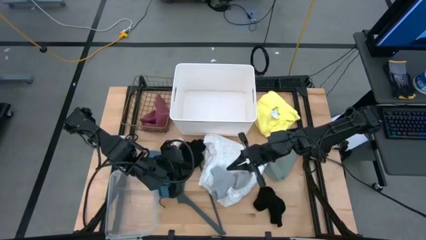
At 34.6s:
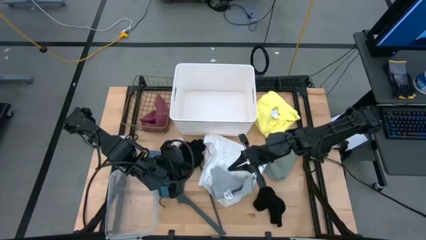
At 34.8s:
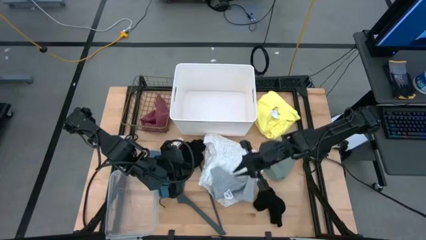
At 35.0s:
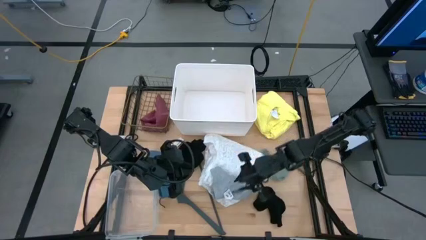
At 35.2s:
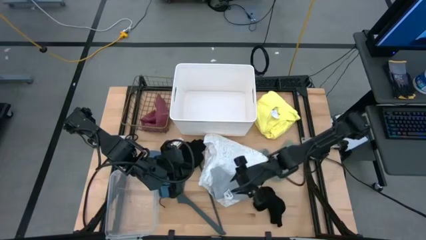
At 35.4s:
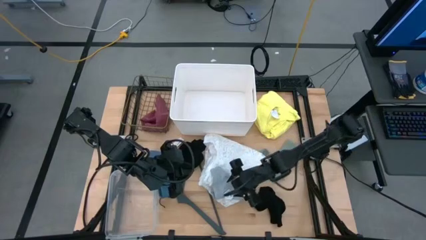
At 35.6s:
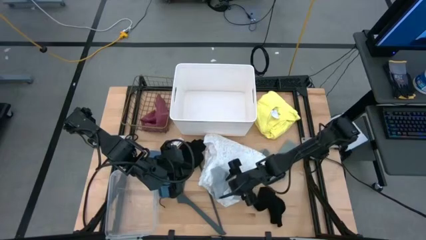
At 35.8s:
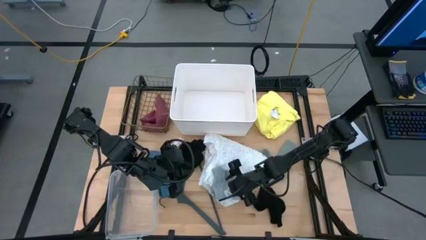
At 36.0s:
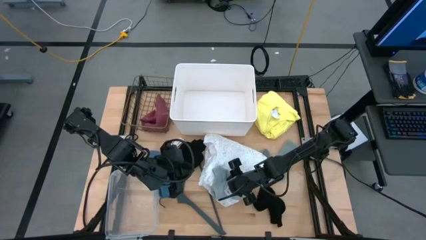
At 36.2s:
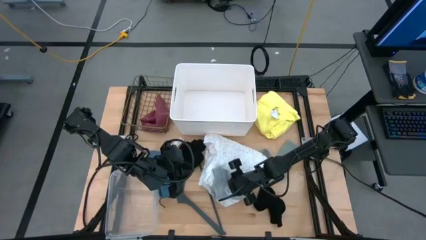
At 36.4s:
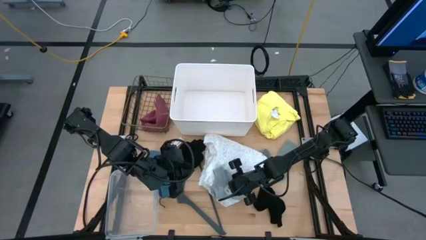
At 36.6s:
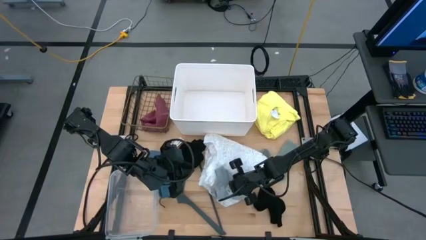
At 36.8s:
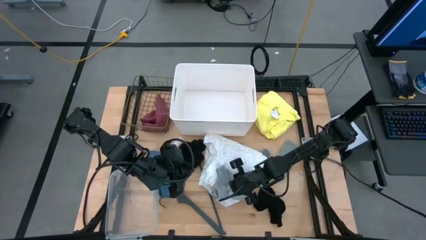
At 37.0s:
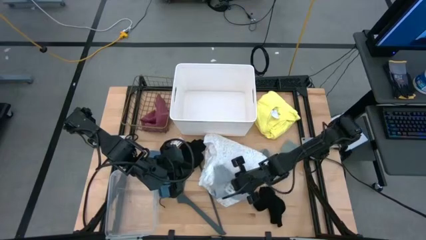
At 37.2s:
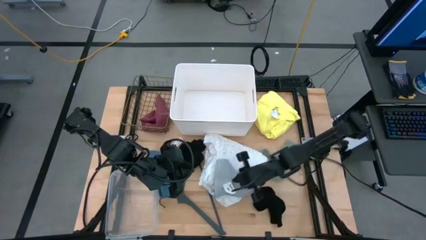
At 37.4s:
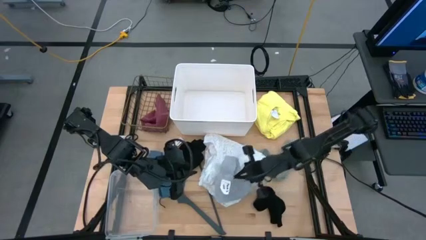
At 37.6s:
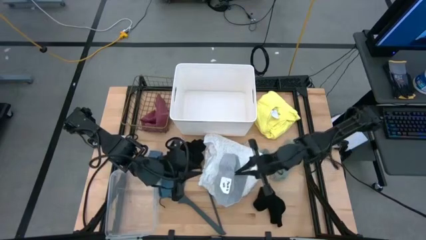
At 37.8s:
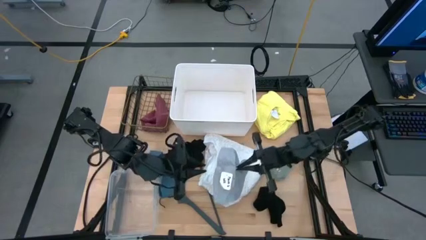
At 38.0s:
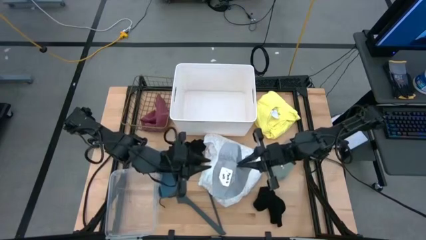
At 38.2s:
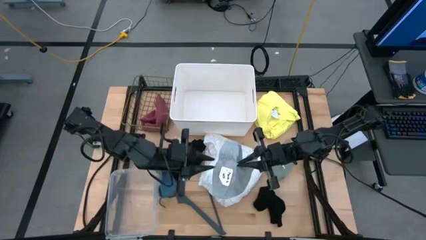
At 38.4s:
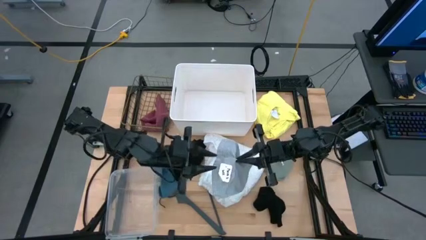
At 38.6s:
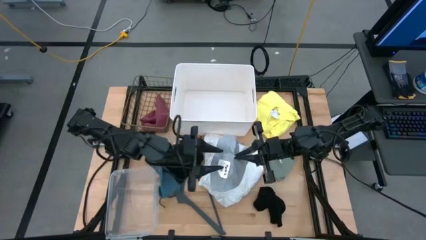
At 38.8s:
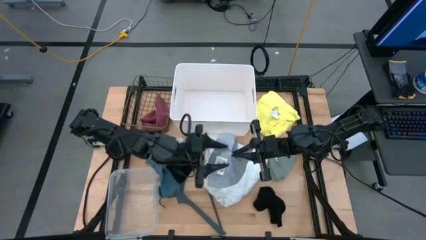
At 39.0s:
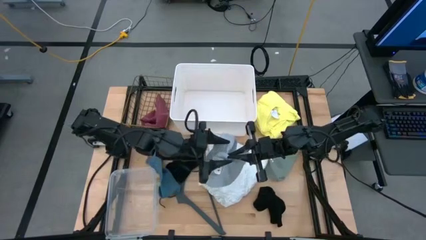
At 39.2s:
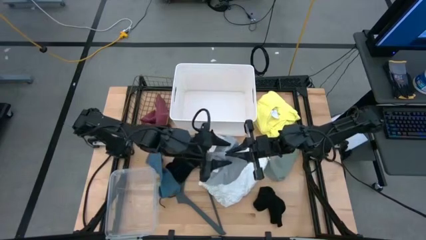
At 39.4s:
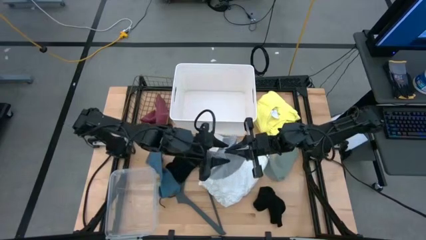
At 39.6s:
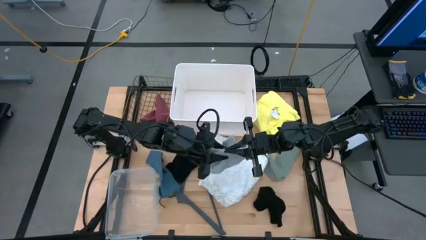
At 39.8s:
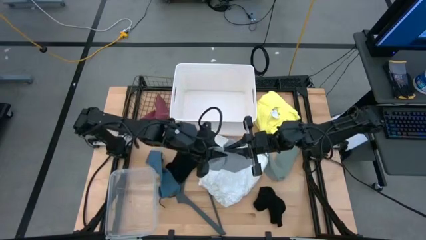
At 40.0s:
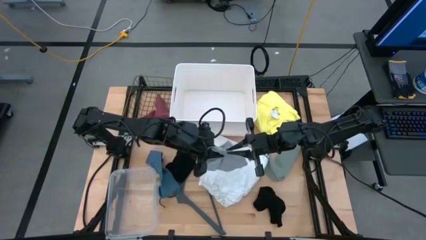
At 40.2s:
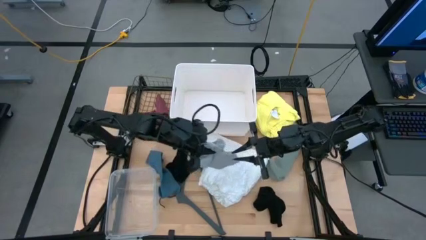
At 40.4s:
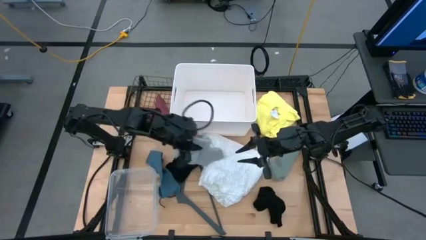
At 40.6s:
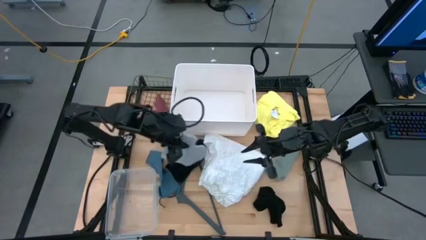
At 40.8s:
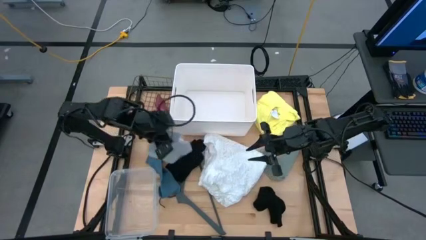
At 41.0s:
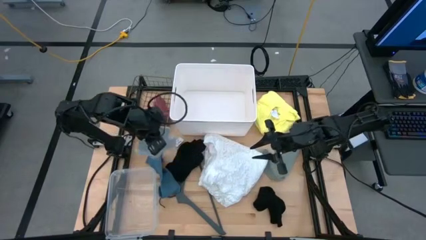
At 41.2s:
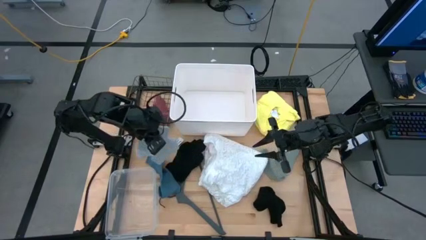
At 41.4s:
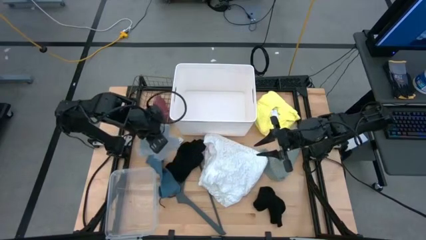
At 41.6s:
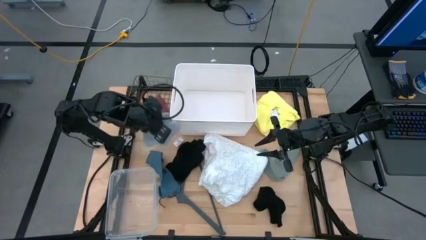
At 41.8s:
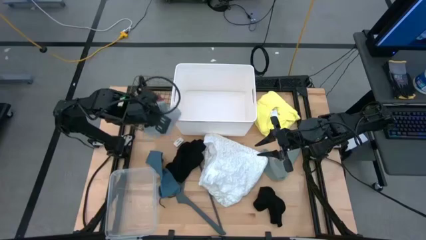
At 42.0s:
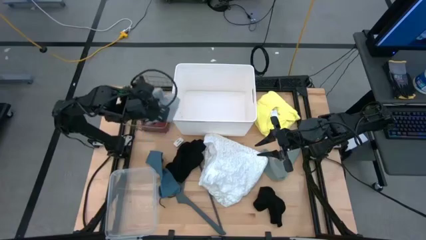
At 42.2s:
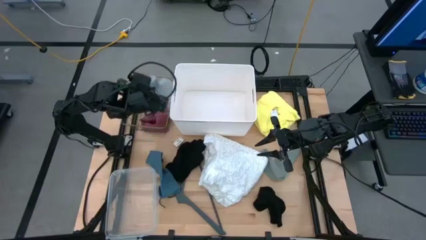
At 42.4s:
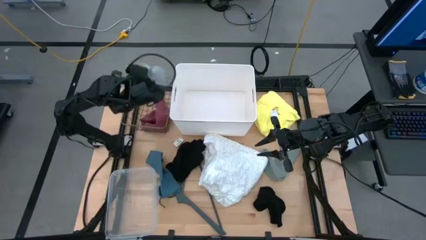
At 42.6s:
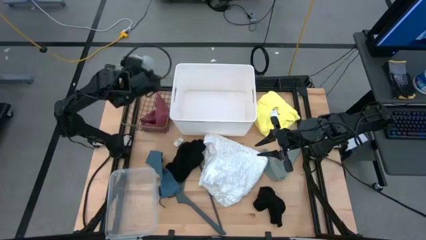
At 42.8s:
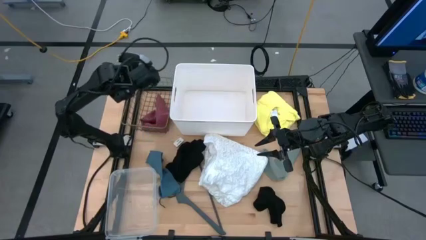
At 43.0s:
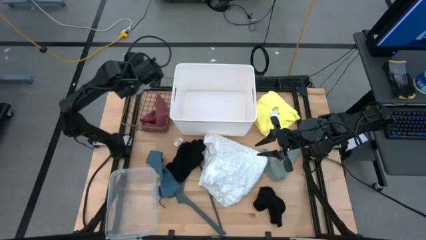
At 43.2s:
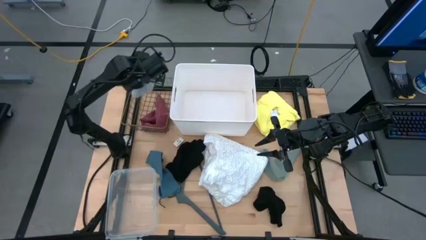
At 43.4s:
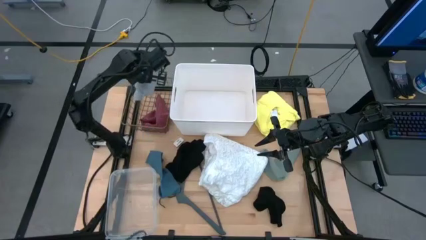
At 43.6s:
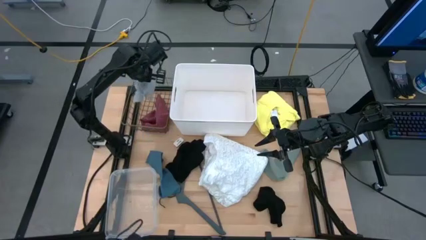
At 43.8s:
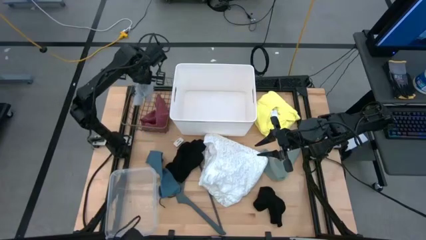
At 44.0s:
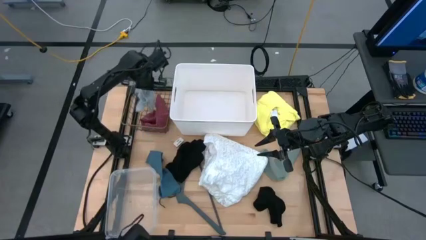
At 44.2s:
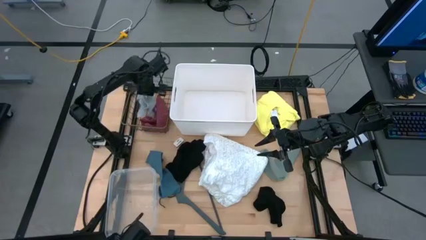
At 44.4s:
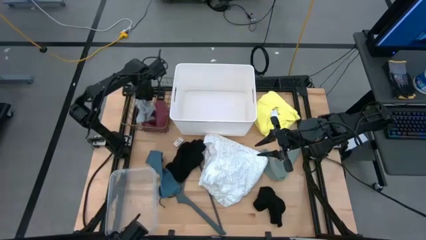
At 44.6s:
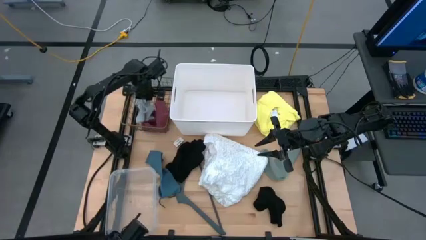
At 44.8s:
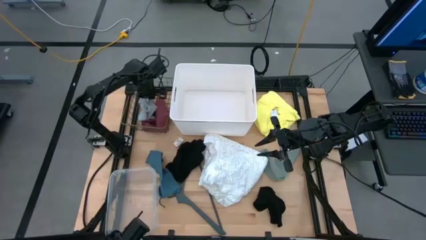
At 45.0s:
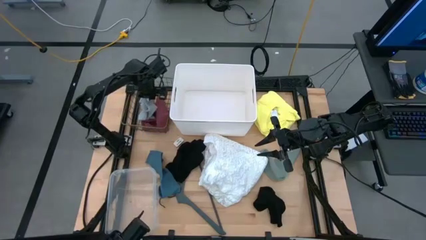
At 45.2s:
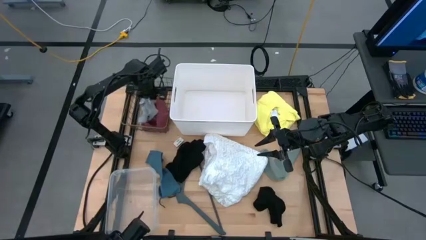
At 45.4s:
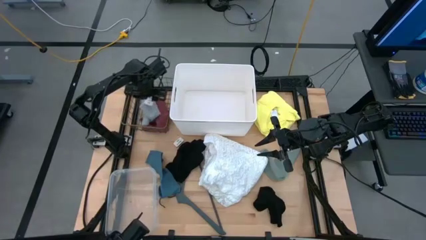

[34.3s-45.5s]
Task: Pick & Place Cloths
Put the gray underwear into the brown basket

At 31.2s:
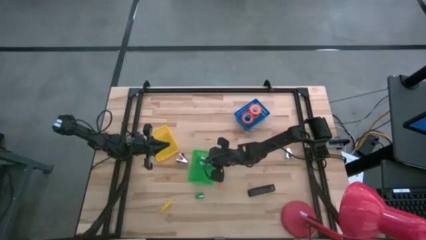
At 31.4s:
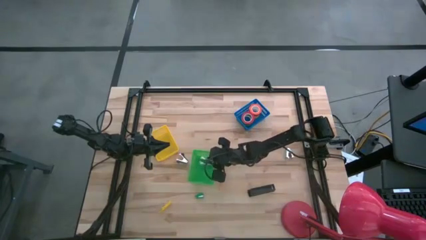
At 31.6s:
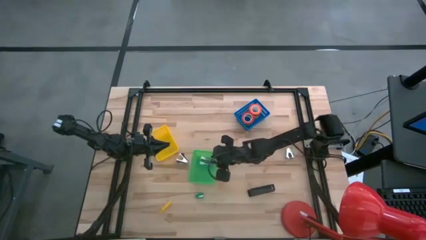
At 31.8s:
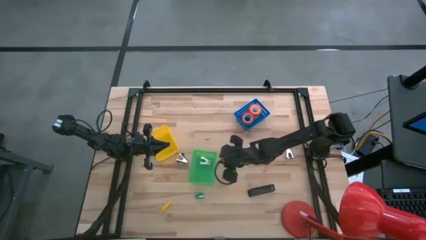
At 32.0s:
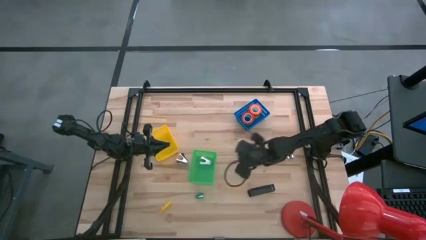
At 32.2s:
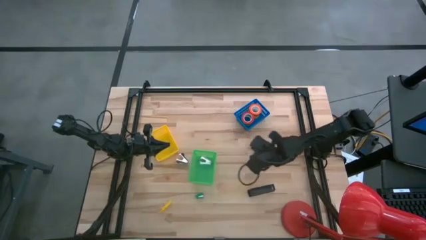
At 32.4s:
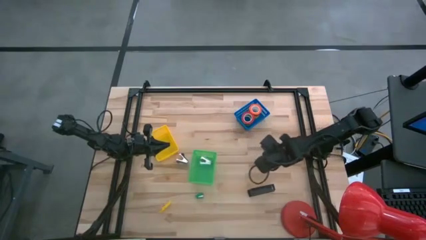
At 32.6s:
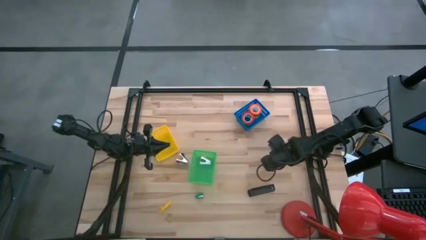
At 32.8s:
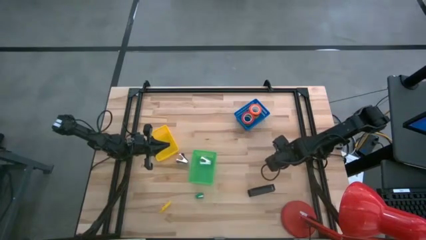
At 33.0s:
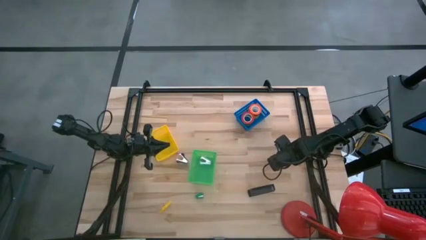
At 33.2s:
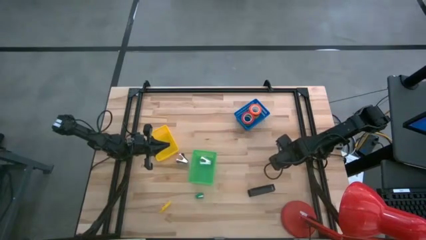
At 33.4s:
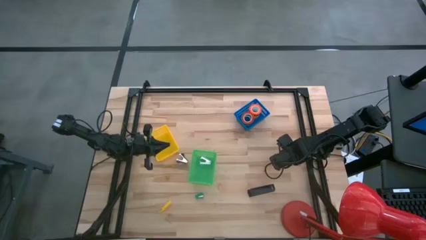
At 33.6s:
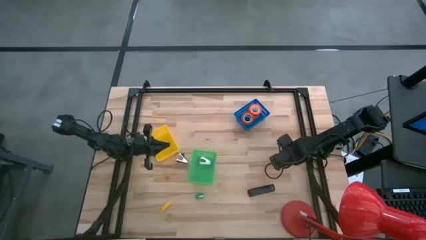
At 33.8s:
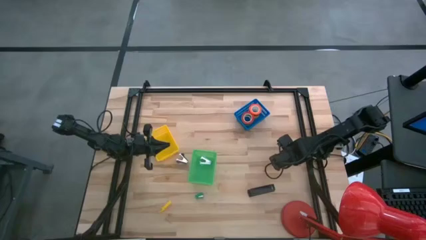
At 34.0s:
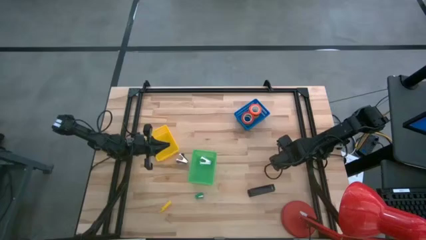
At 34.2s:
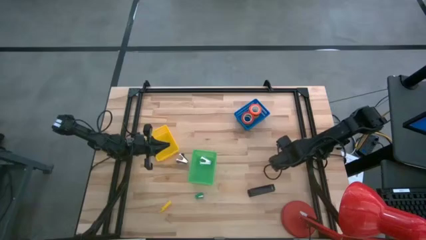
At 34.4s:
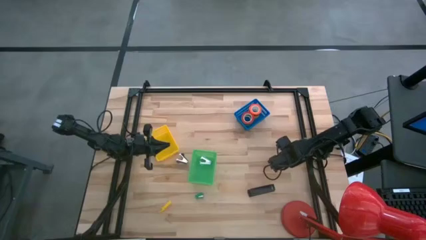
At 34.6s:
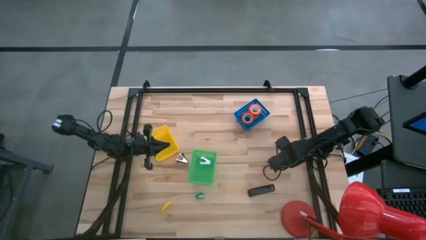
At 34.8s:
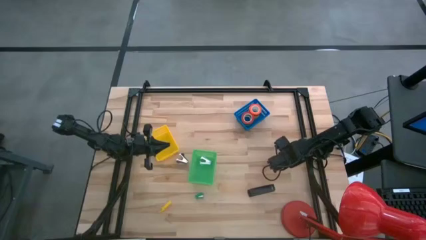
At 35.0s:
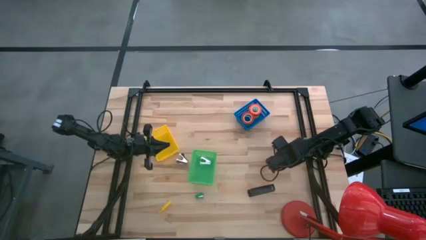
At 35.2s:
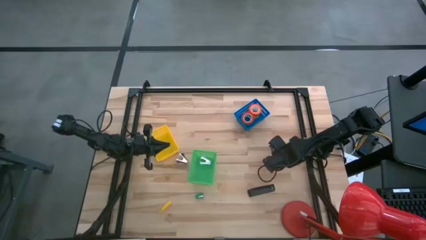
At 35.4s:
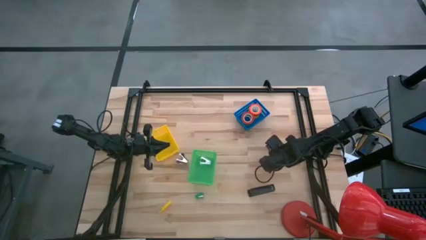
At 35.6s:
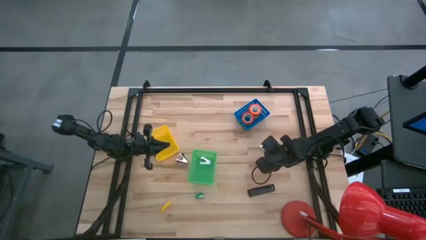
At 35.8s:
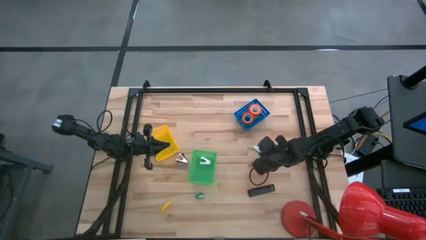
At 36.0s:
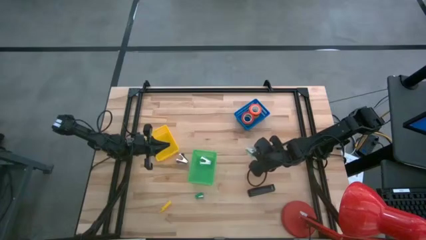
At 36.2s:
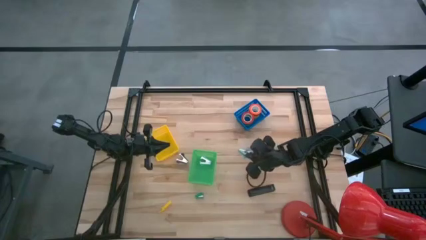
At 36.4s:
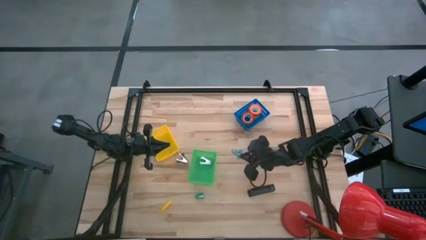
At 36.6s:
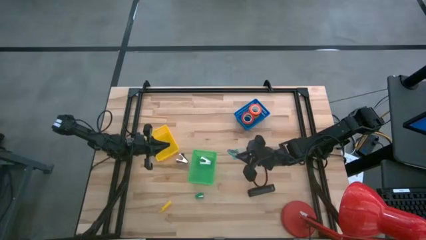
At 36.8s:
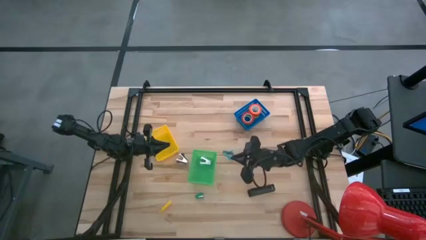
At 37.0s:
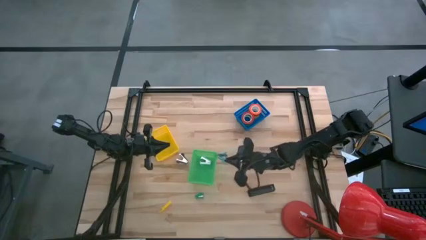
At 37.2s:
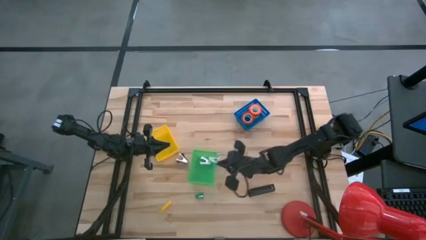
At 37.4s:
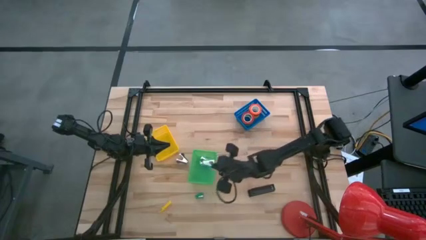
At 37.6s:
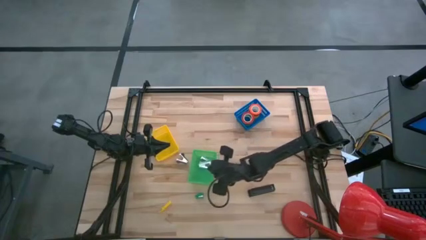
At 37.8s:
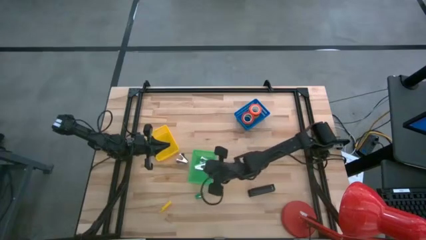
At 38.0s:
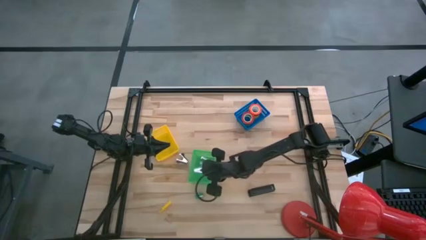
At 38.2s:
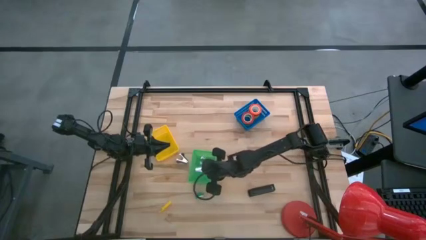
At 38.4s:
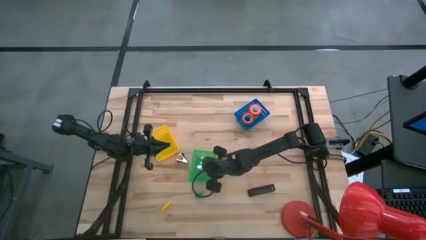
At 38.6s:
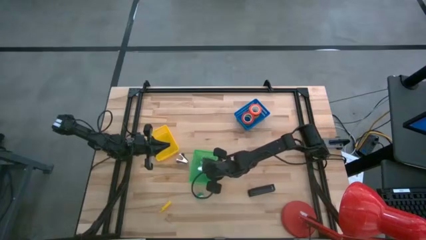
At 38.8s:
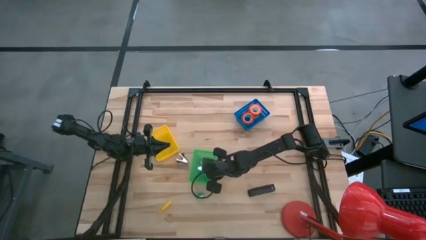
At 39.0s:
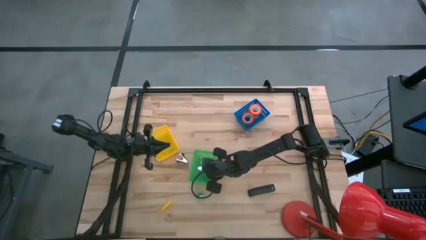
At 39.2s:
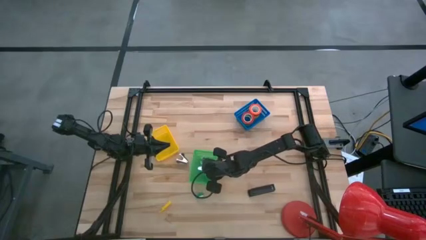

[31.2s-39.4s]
Task: Pick and place Stapler, Stapler remover, tape
Put the light blue staple remover into the green bin
